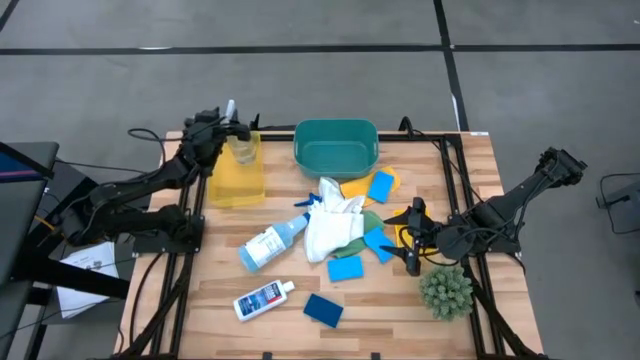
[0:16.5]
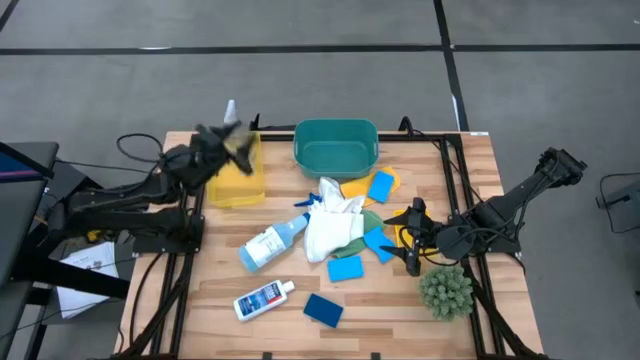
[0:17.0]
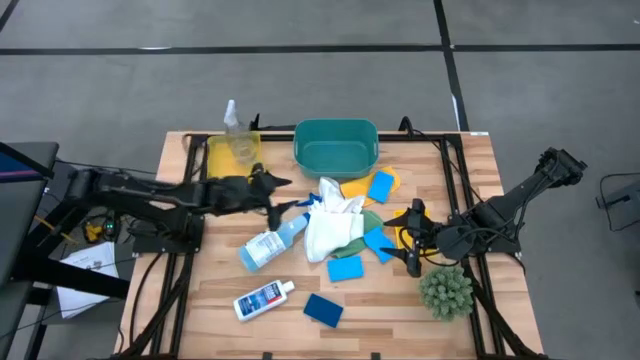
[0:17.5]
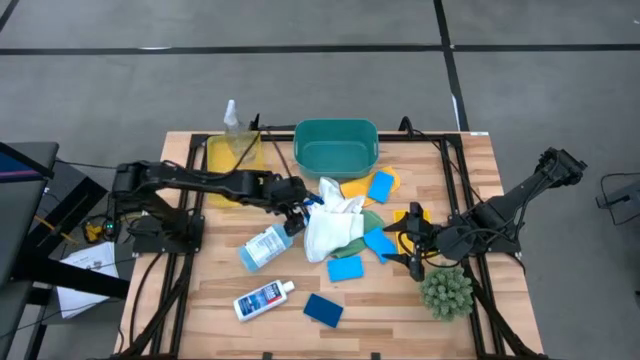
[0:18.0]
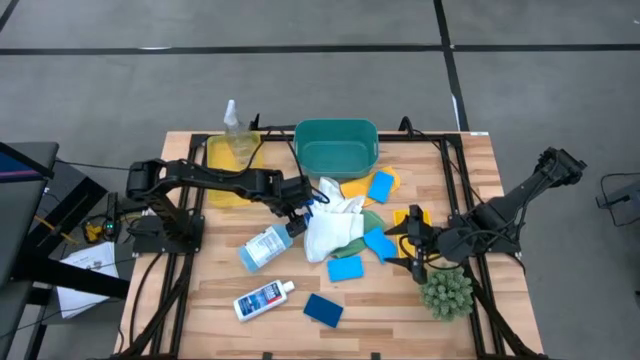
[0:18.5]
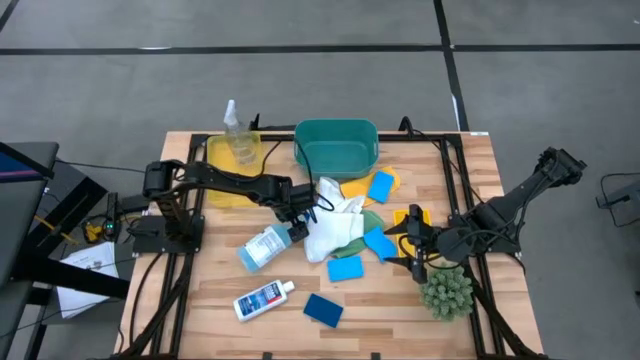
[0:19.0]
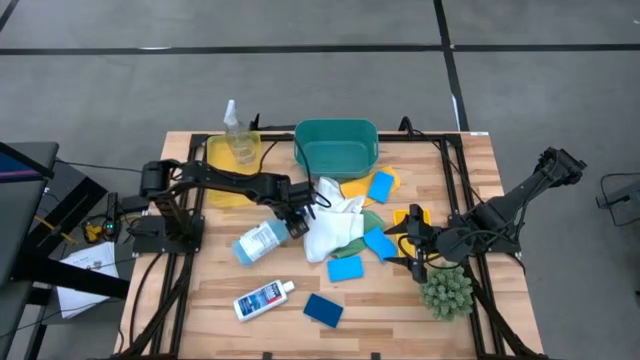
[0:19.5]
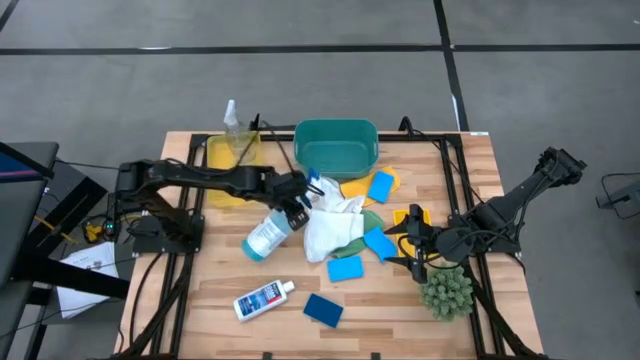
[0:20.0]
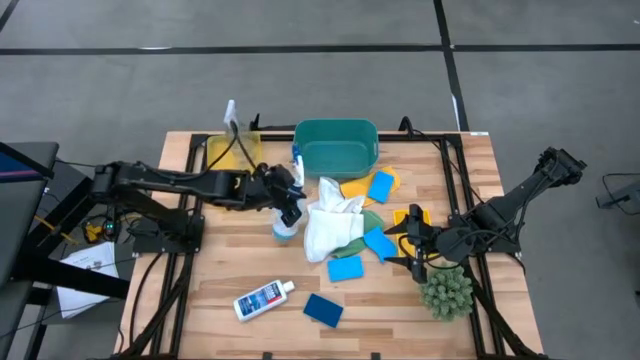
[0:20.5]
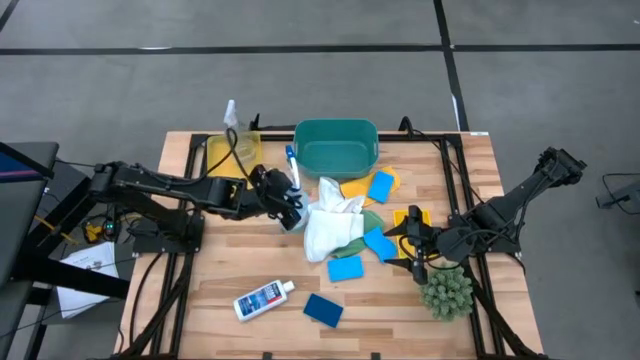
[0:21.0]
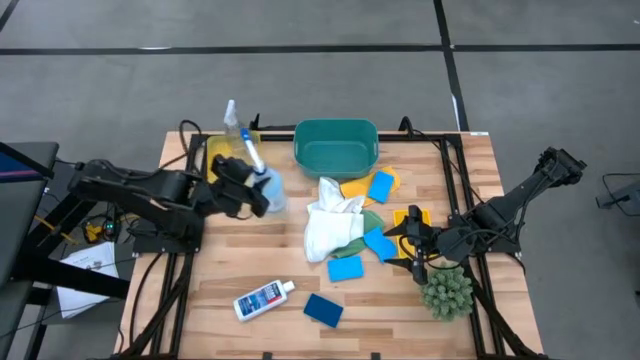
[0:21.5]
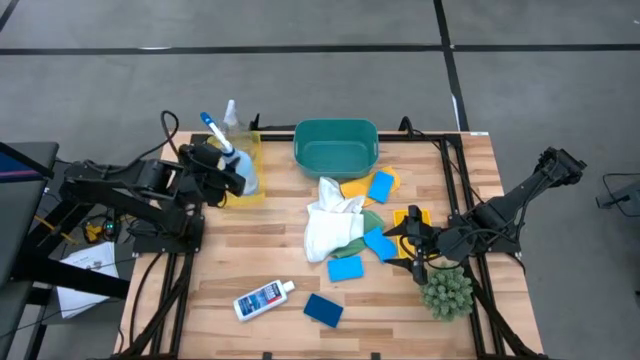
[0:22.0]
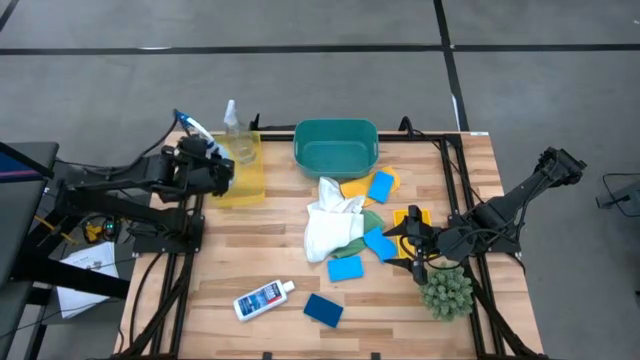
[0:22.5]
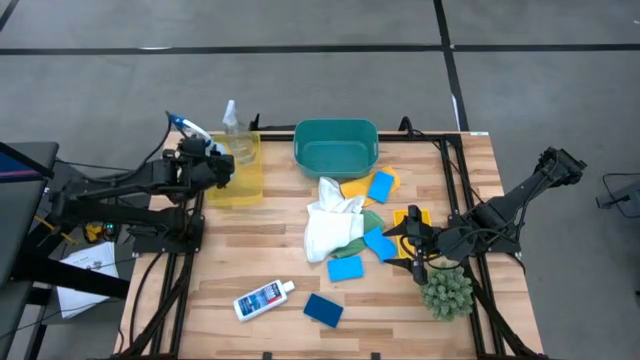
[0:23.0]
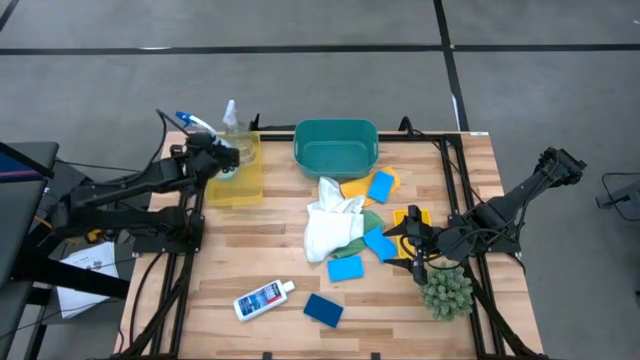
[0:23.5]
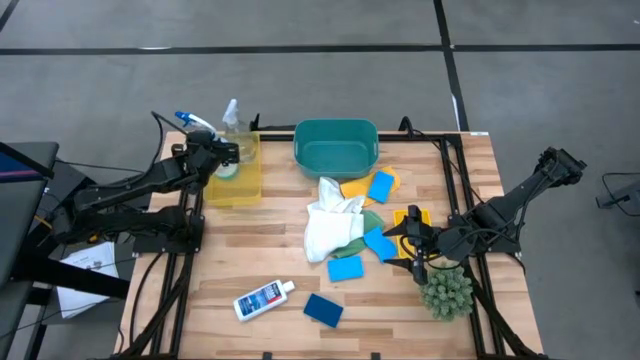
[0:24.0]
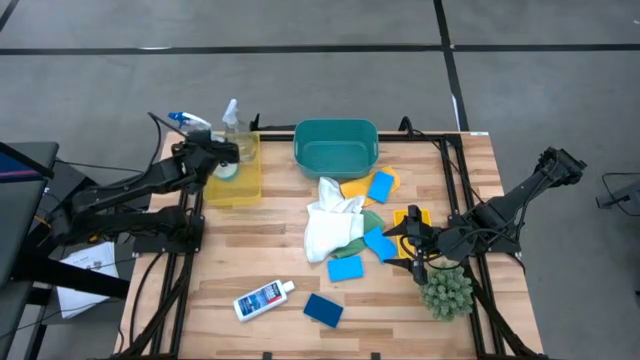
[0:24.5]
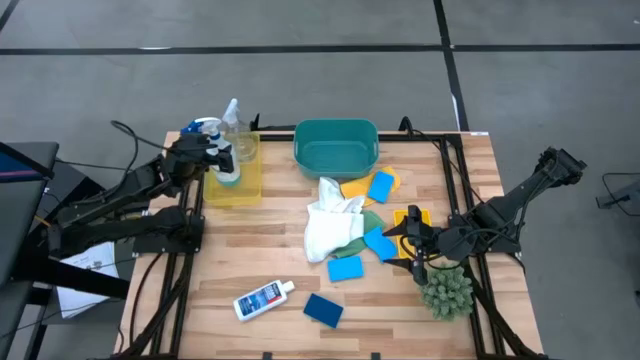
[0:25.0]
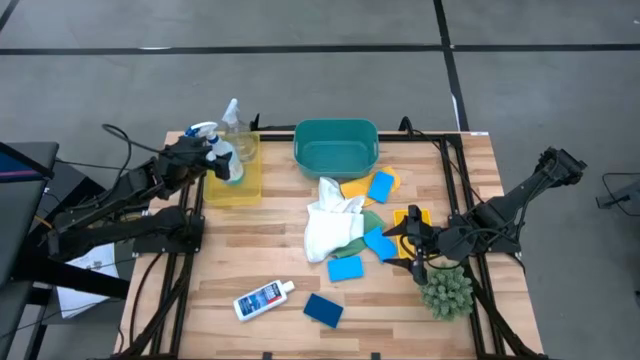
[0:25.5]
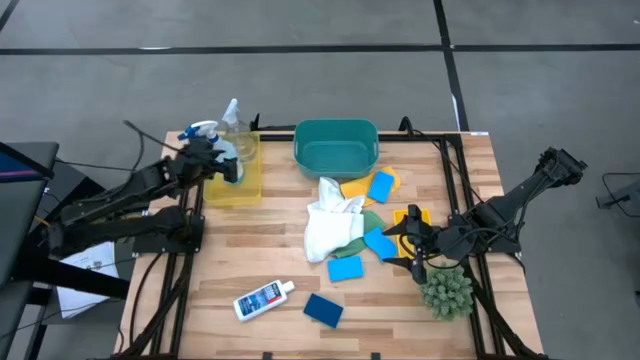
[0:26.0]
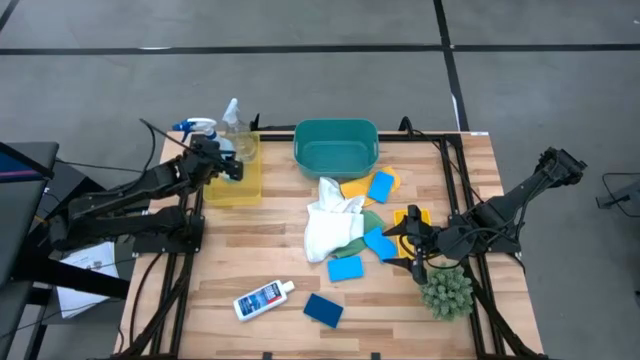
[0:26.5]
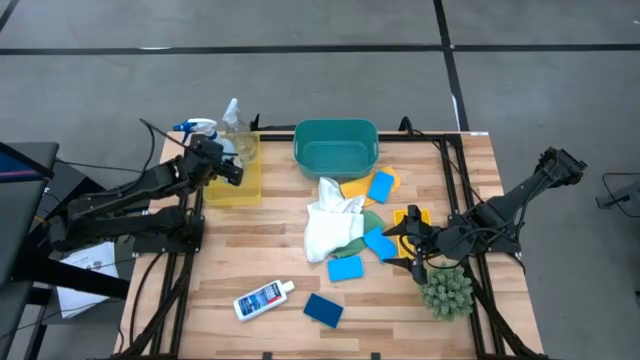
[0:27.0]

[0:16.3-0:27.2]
Task: Pick & Place Kitchen Items
Put the blue spray bottle into the left yellow bin

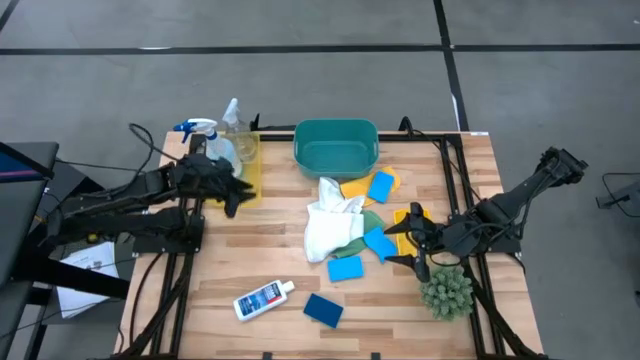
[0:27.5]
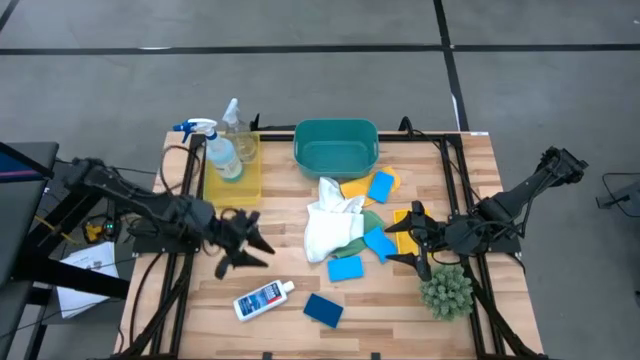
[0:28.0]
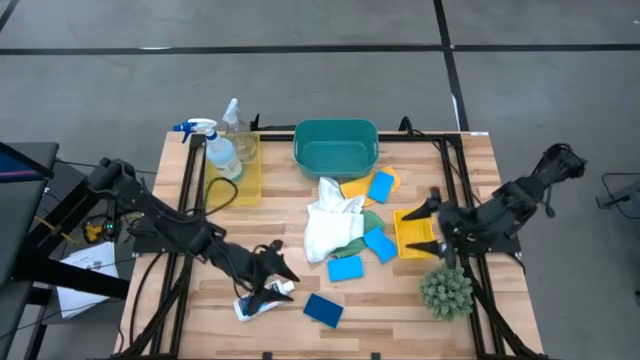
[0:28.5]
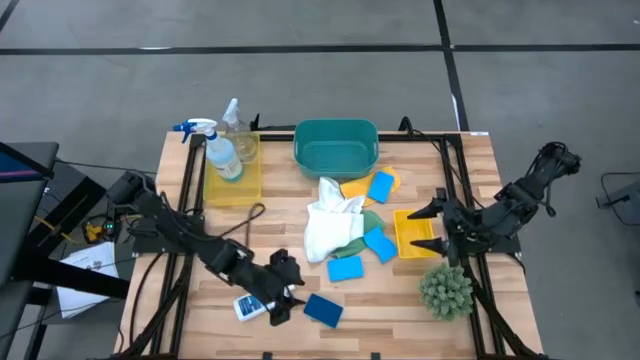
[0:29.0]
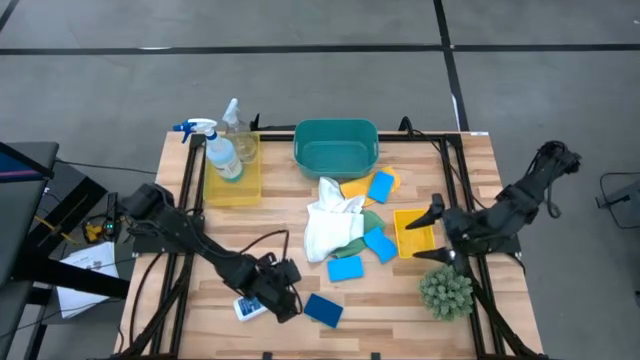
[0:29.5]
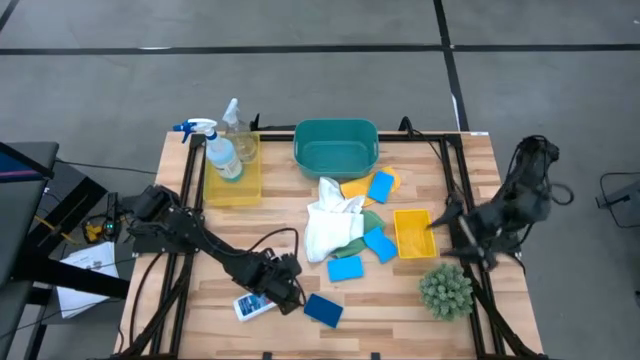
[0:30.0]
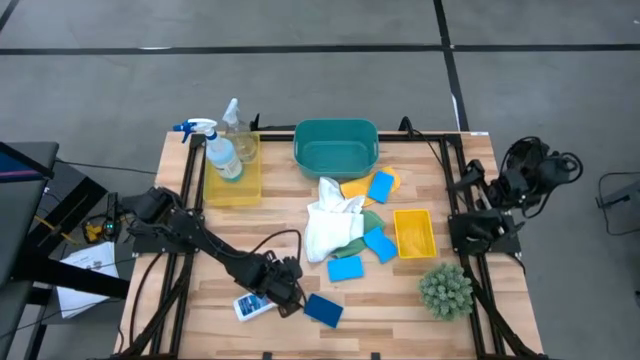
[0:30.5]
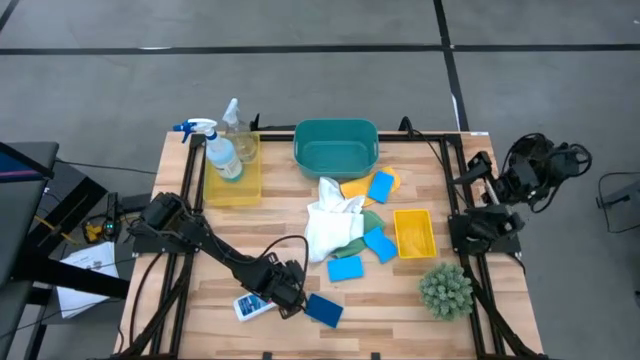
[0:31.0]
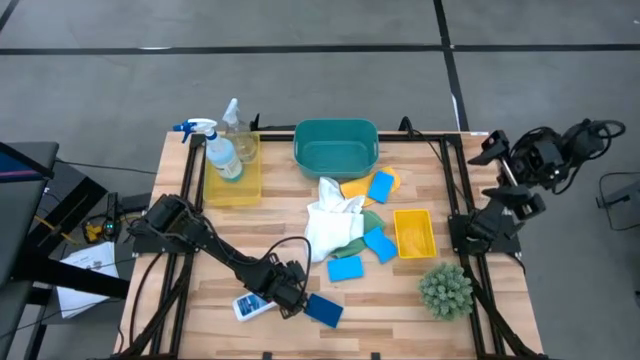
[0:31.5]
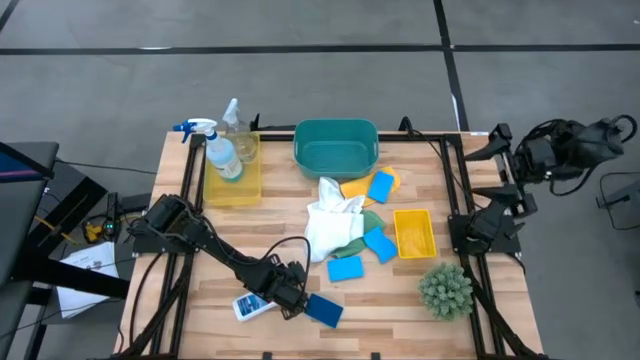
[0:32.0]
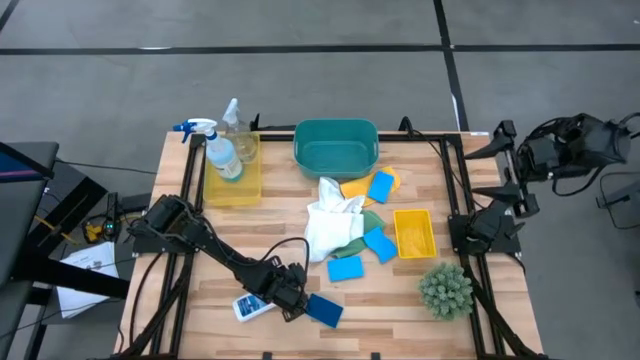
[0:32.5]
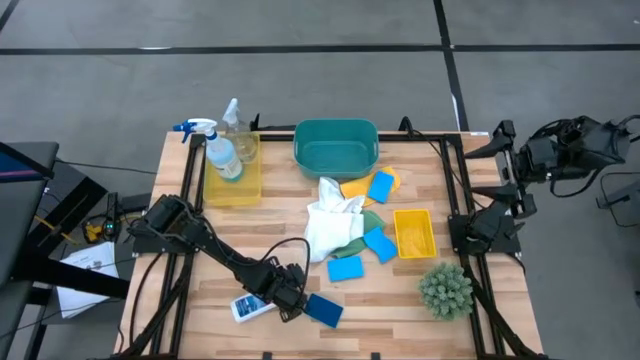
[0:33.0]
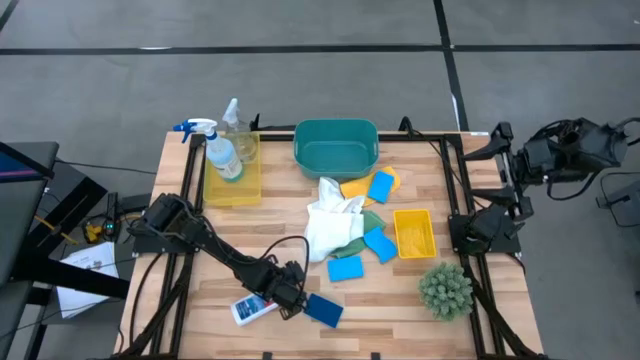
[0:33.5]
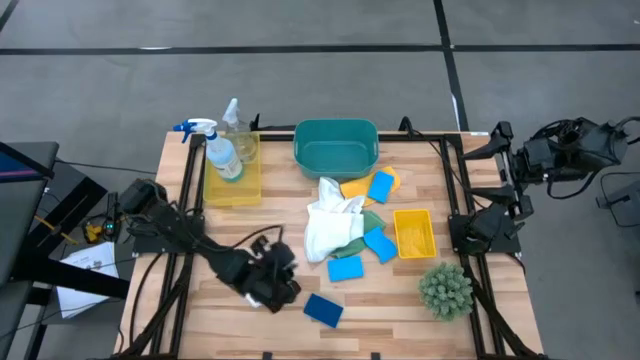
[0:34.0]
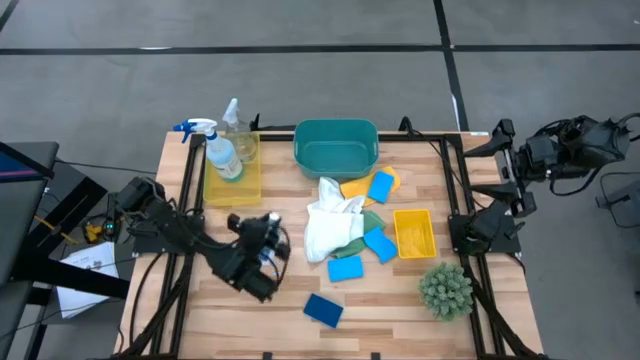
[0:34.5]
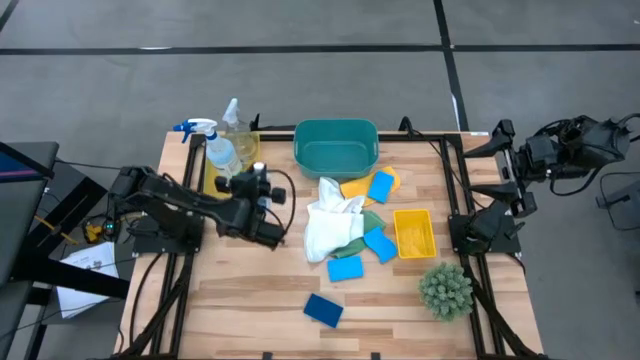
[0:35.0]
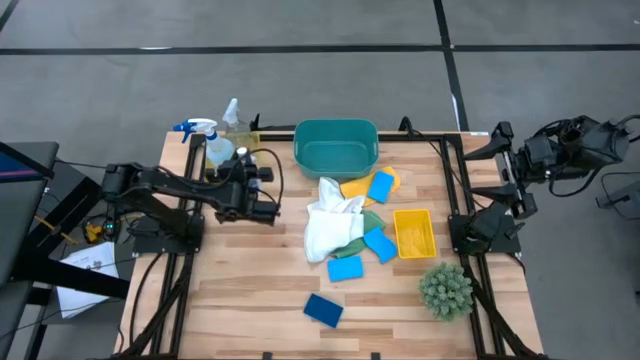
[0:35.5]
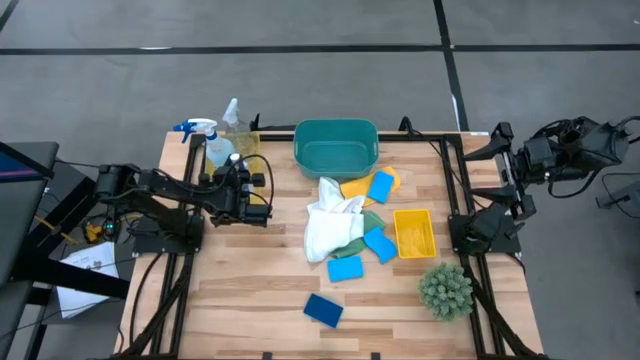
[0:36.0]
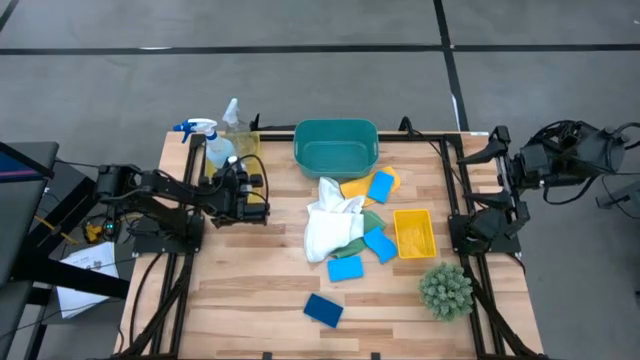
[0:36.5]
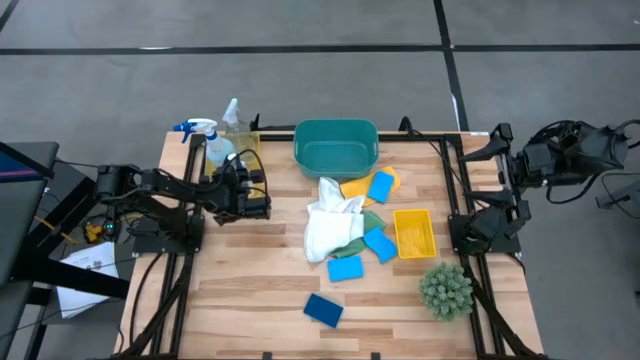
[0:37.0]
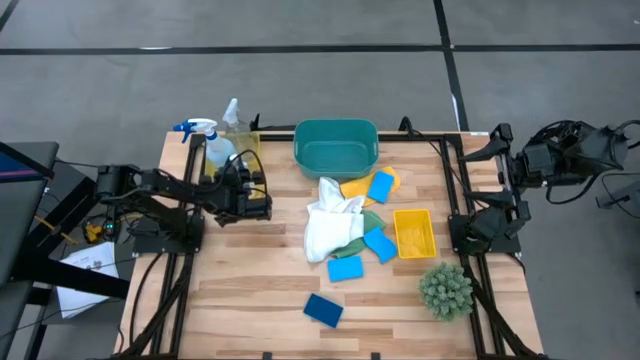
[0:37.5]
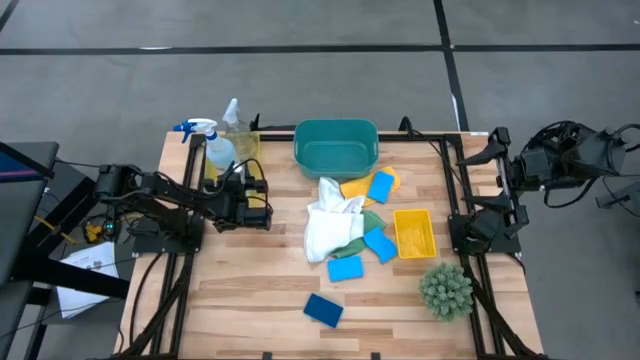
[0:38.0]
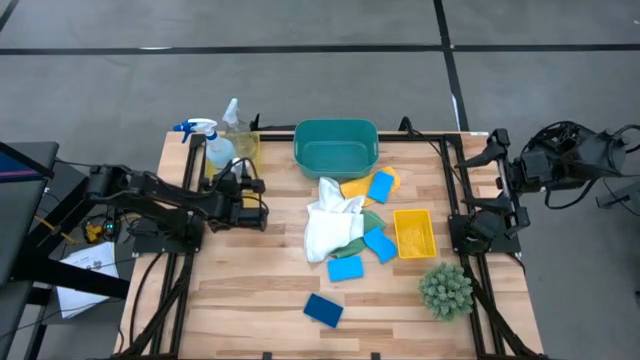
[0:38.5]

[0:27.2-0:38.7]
Put the white plastic restorer bottle into the left yellow bin
